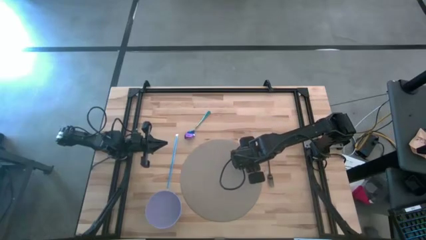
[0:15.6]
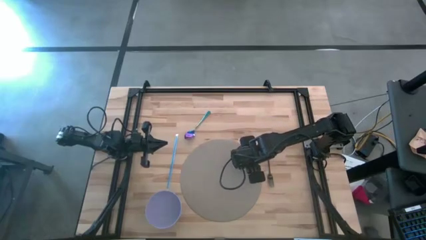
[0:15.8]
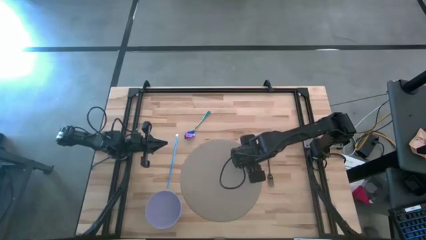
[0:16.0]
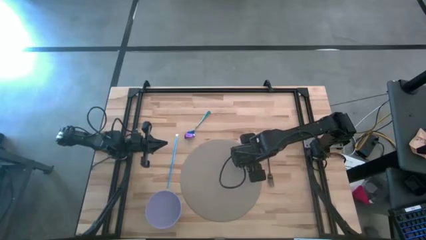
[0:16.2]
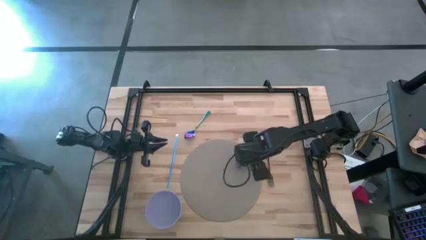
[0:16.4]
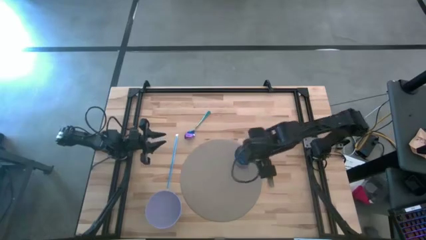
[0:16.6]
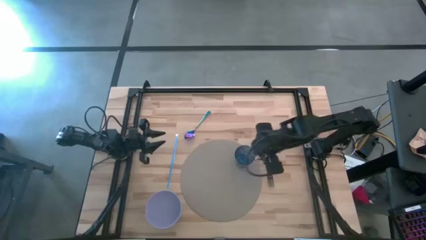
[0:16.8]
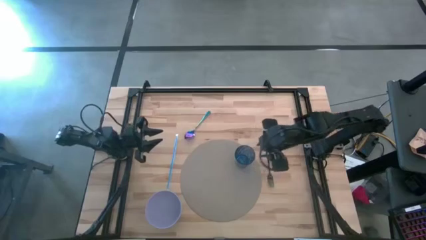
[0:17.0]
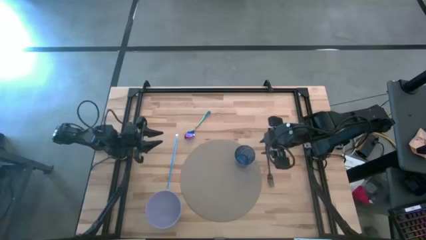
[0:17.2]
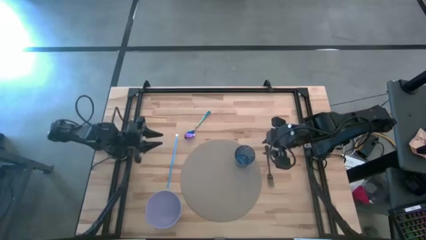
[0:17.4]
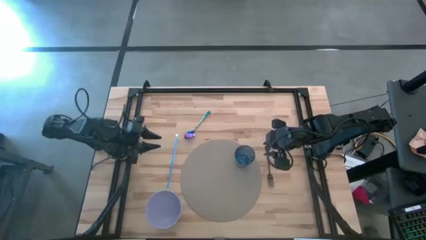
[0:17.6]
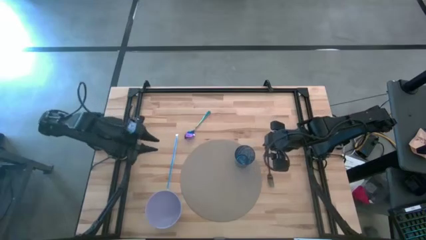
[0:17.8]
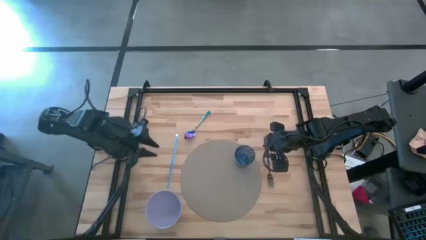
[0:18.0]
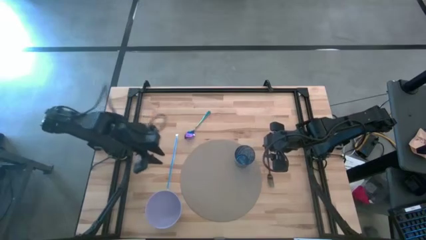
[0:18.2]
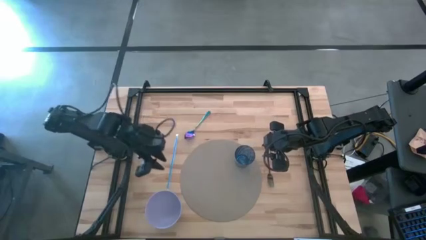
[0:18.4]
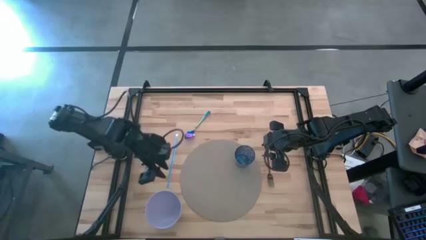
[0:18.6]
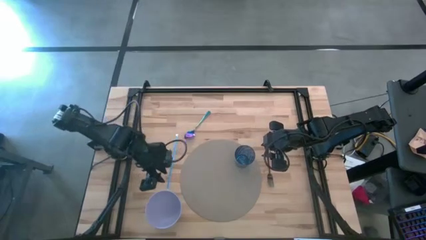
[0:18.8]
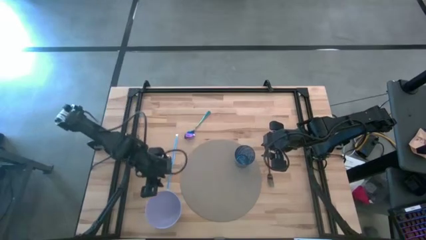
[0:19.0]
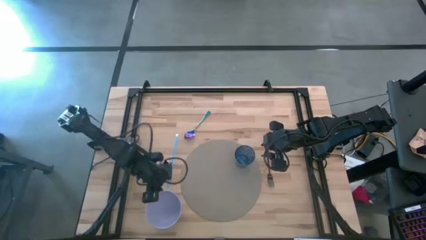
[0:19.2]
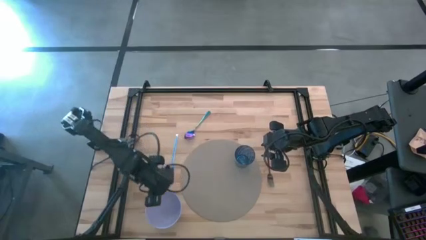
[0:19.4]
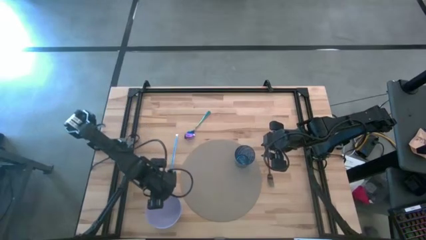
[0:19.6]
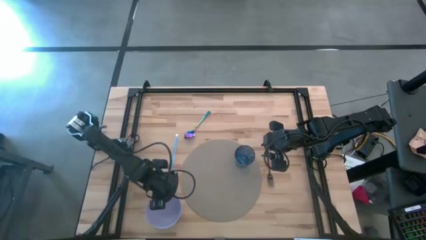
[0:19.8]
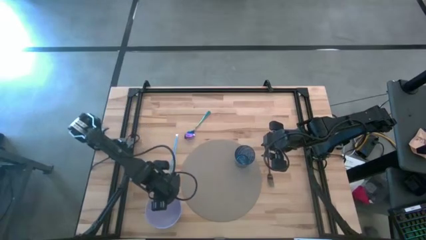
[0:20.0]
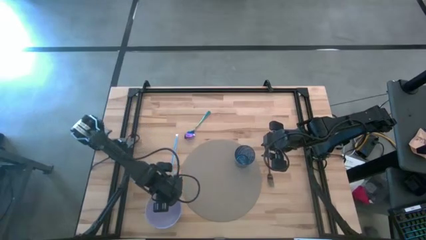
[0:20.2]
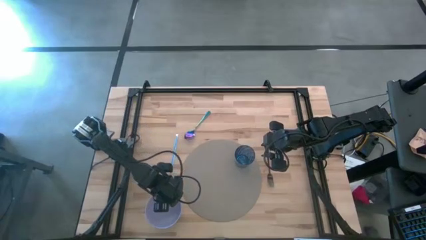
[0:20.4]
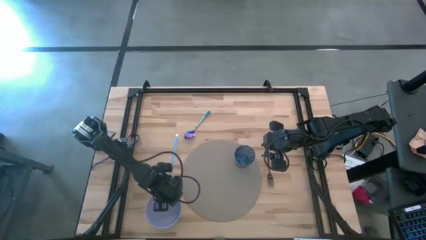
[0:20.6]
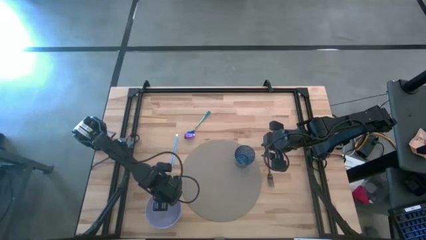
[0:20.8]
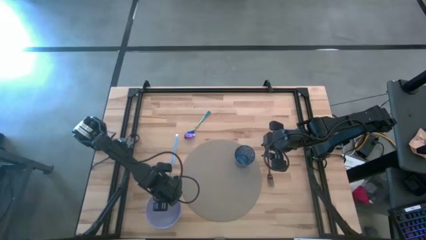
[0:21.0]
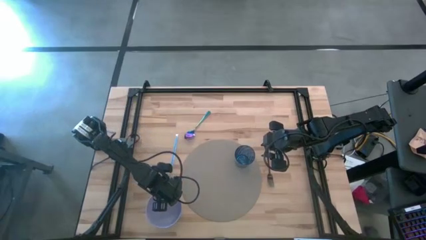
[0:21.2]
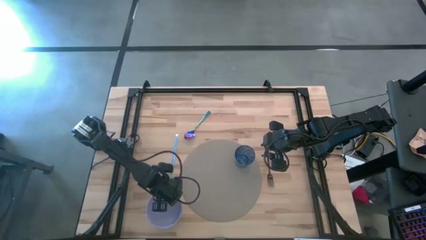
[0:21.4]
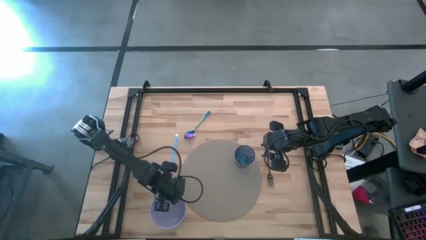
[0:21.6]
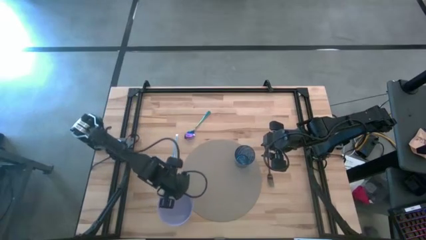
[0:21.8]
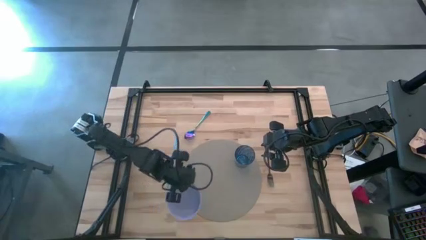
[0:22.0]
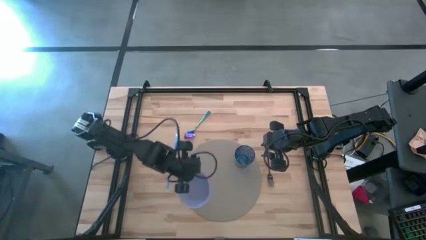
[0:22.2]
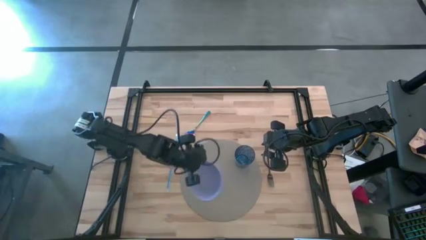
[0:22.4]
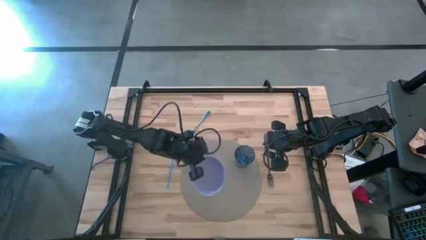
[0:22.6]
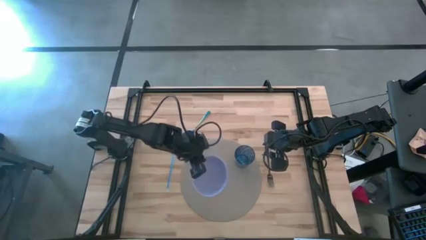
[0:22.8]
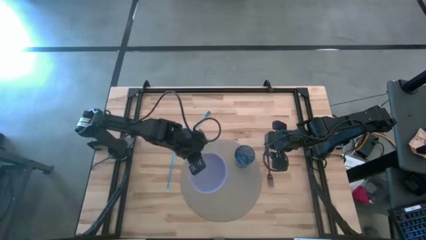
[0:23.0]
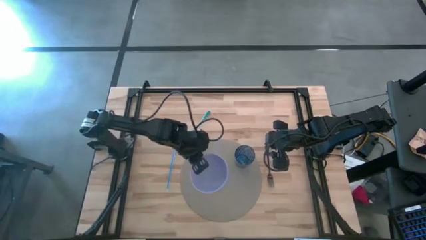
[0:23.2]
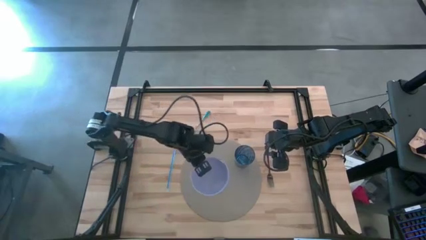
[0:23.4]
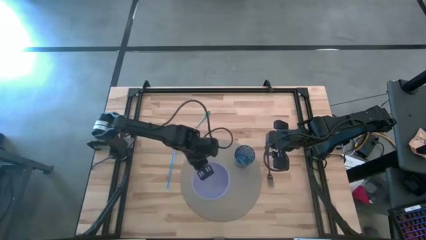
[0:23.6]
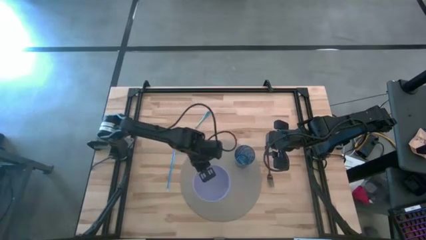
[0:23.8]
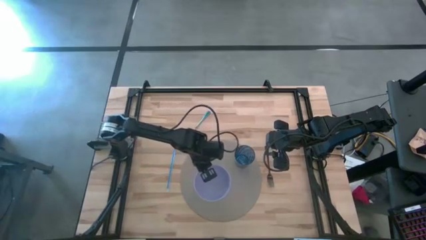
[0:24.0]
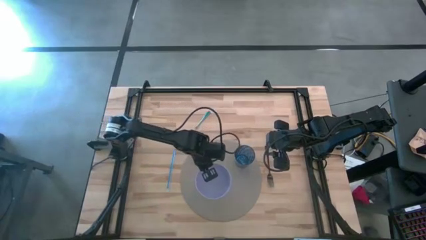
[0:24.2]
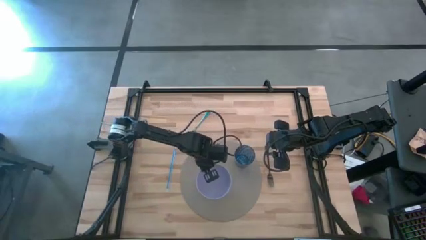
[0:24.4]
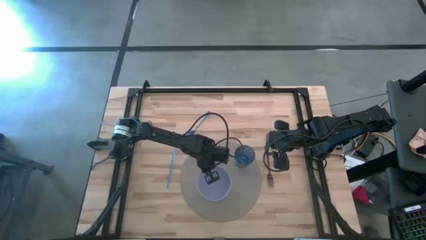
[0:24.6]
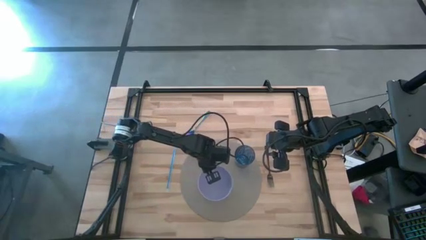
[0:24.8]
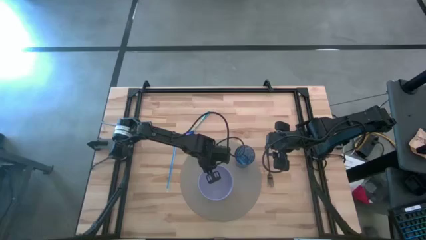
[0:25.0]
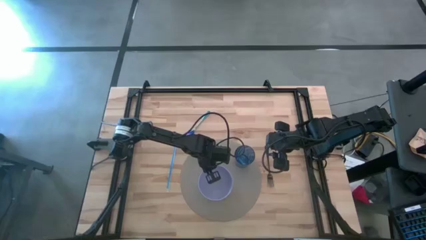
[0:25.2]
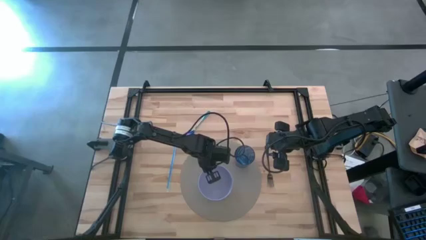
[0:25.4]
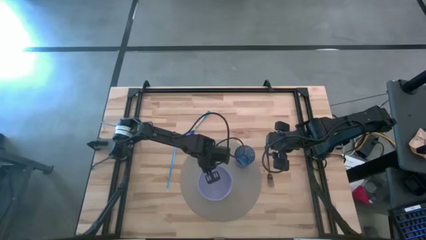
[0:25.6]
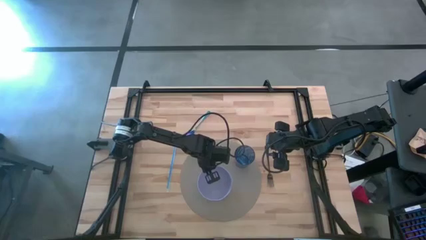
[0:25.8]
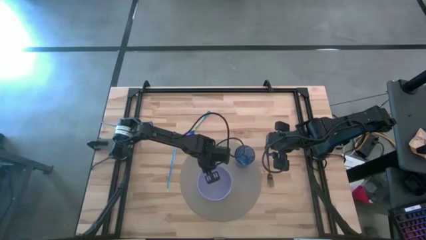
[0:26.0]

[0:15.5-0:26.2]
Task: Pick & Place Utensil
Put the bowl on the mat to the bottom left of the cup

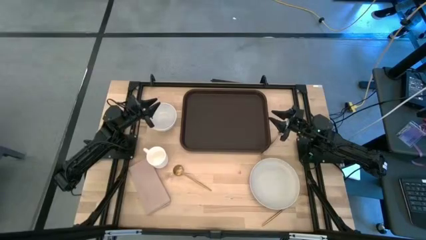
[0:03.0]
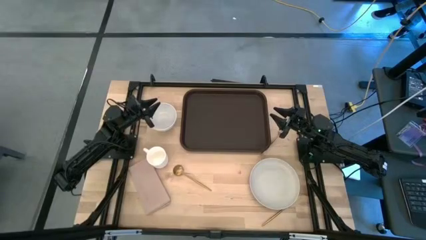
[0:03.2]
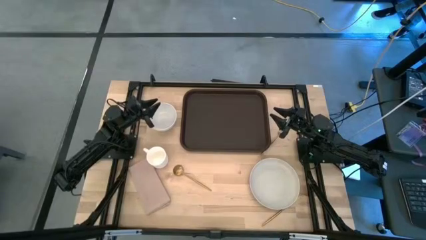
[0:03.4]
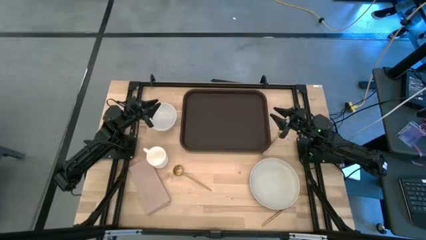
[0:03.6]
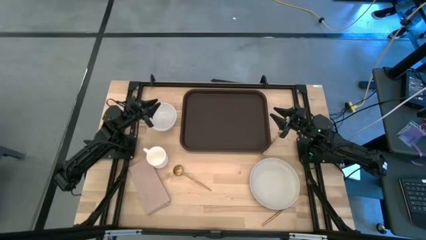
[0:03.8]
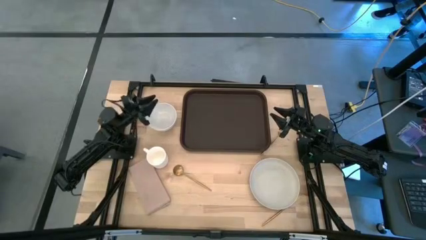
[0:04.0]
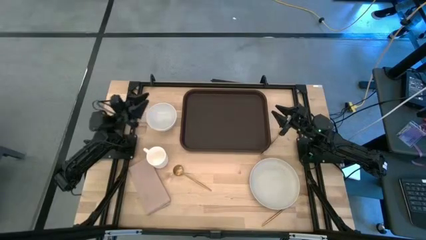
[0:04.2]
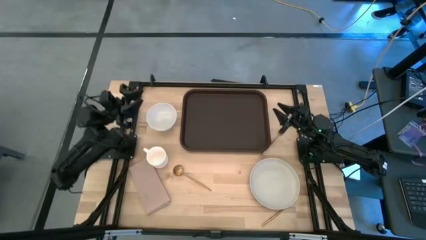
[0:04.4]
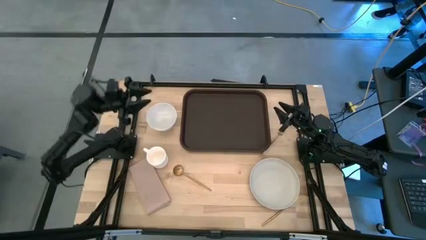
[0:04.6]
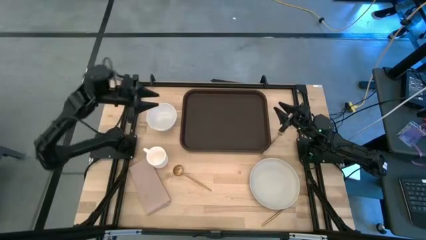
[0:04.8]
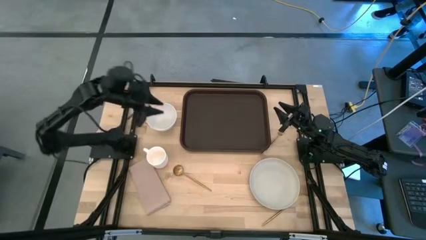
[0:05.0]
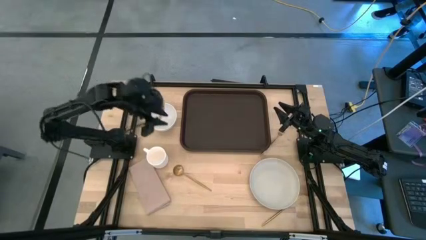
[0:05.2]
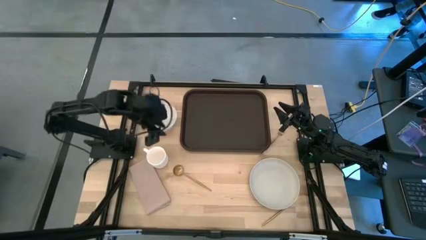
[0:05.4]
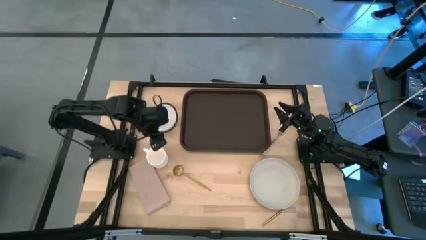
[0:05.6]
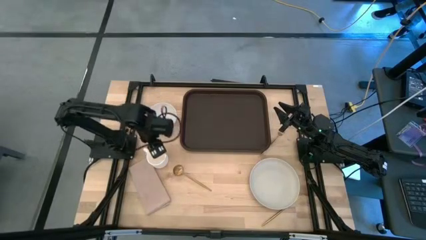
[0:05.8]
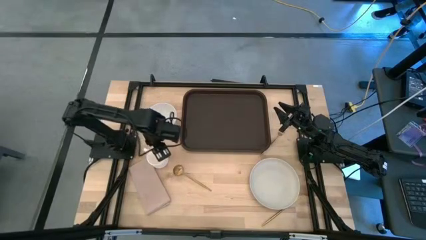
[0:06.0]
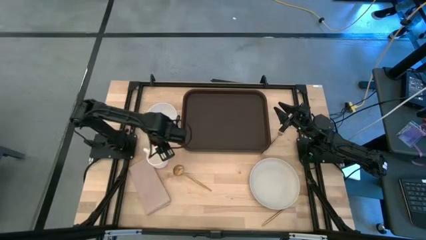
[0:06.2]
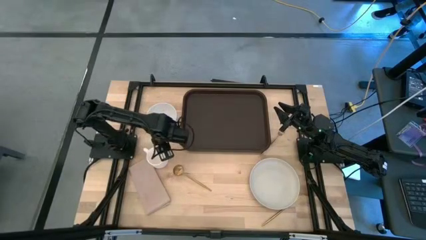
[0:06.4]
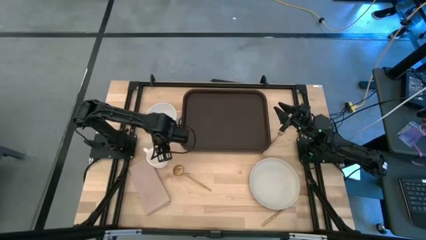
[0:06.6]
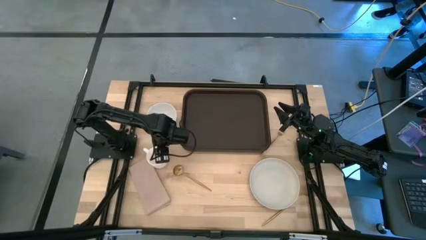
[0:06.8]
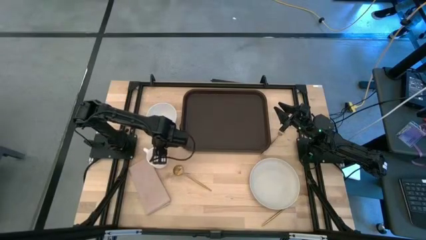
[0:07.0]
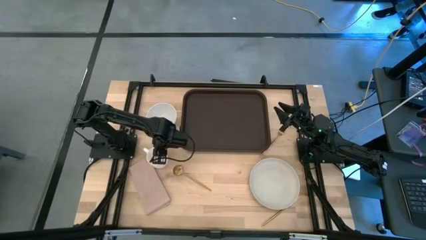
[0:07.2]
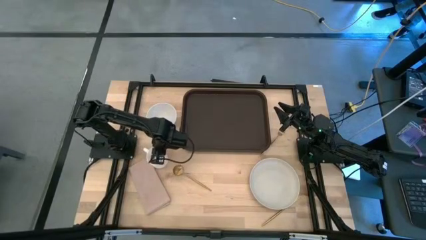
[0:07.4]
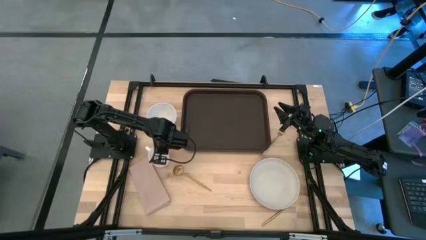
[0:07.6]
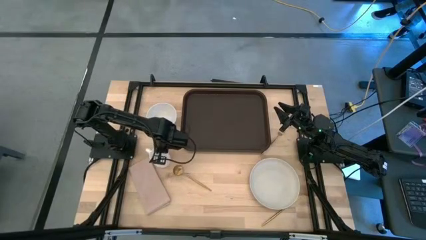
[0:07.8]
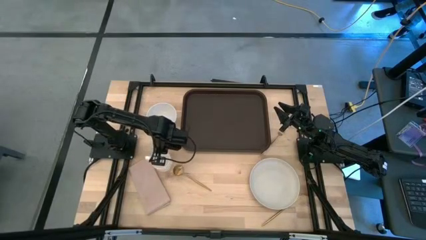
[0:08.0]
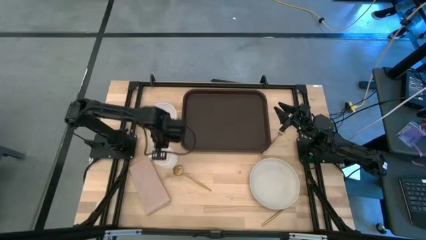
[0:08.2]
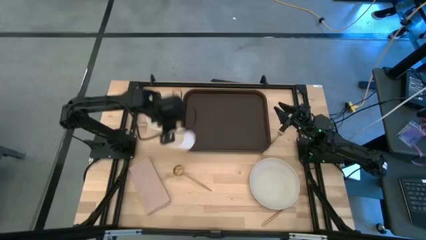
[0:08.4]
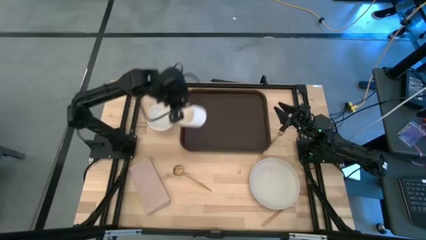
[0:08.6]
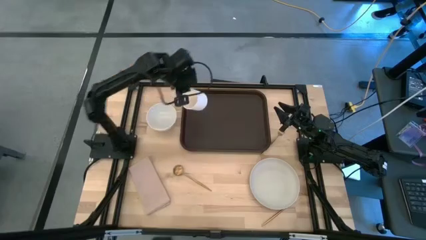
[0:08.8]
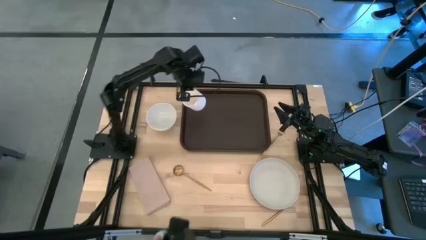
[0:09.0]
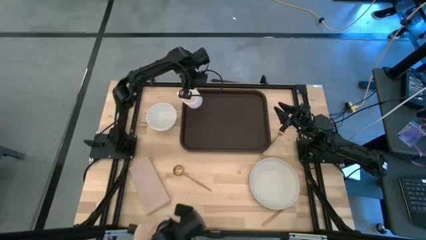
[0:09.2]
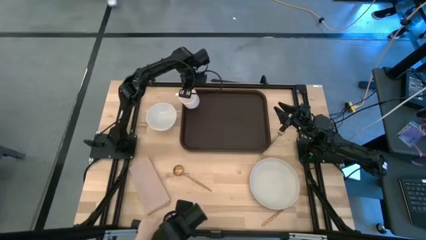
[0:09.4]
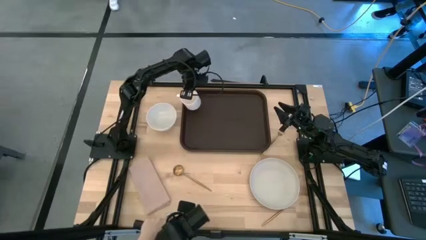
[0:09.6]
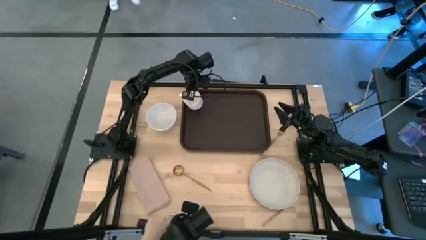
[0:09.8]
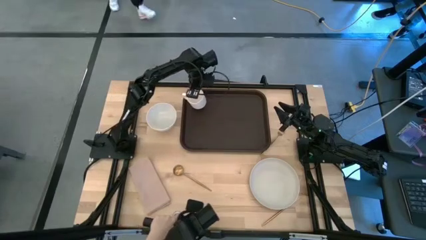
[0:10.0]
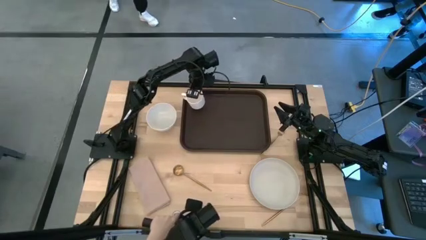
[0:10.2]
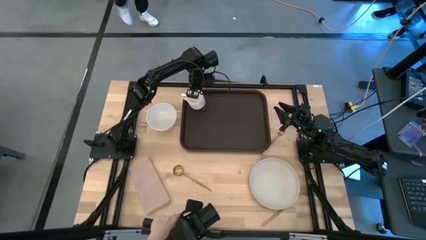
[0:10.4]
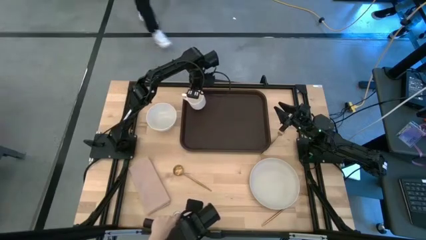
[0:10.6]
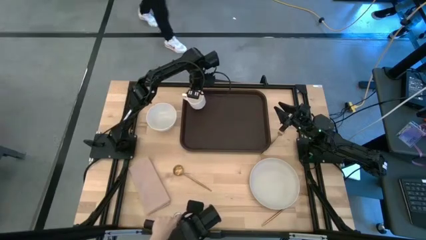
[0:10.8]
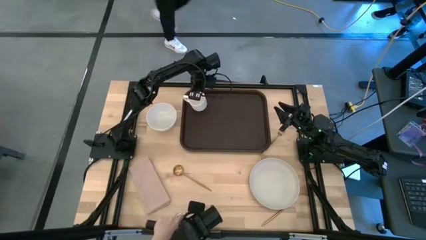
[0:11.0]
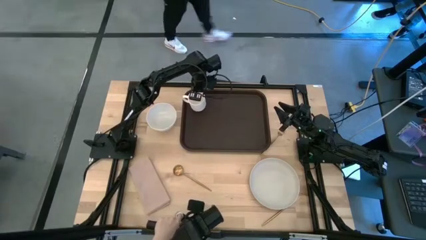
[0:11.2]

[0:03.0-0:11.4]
Task: Set up tray
Put the white mug on the brown serving tray
